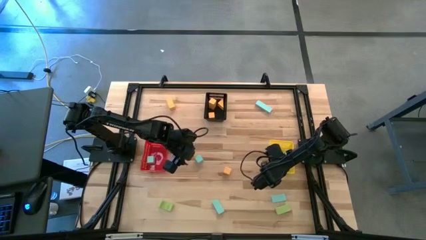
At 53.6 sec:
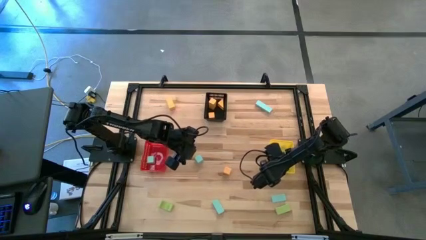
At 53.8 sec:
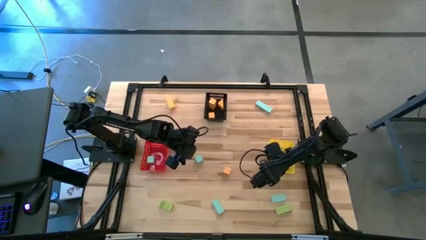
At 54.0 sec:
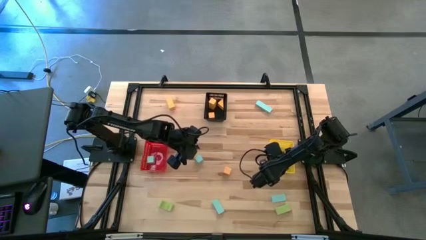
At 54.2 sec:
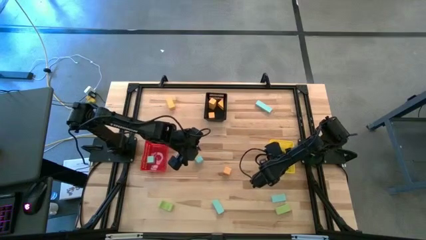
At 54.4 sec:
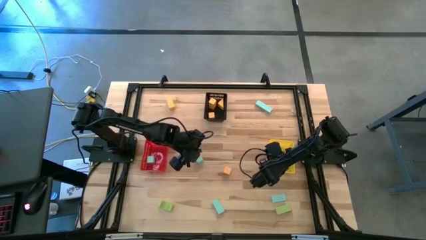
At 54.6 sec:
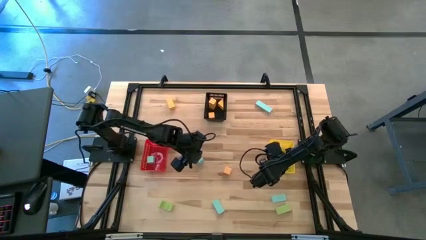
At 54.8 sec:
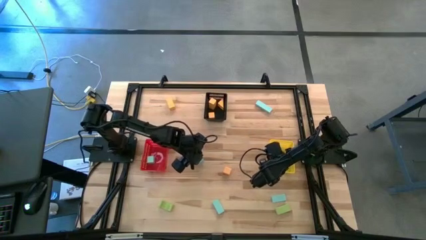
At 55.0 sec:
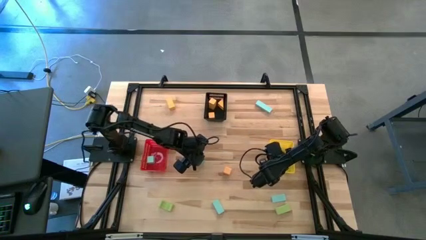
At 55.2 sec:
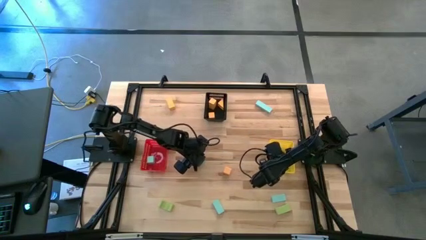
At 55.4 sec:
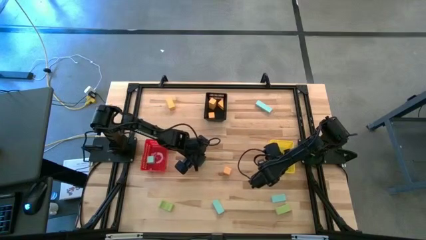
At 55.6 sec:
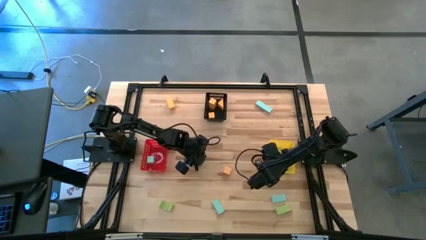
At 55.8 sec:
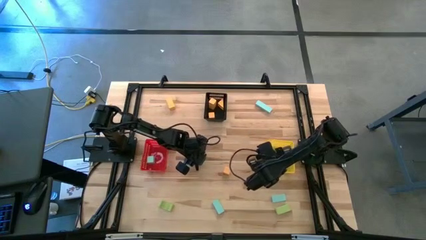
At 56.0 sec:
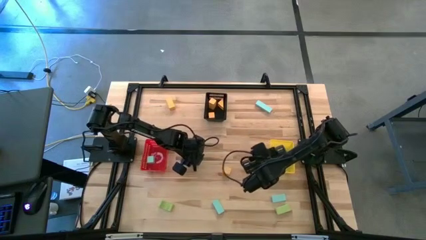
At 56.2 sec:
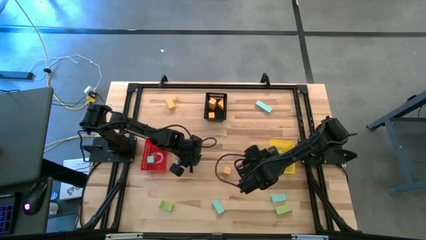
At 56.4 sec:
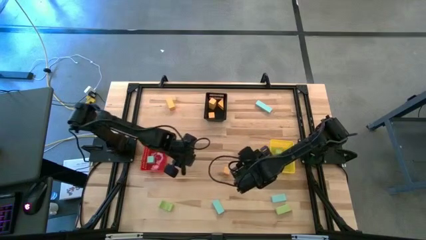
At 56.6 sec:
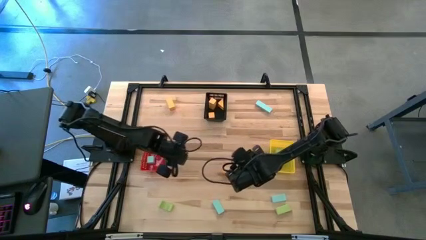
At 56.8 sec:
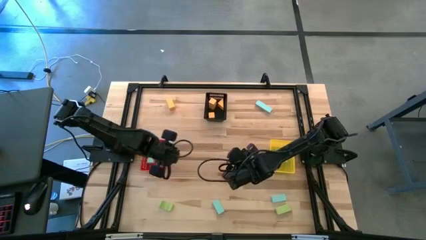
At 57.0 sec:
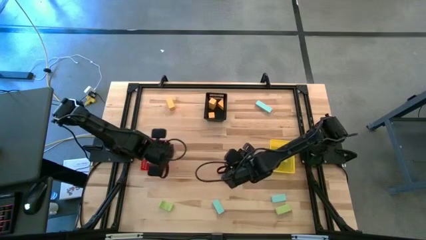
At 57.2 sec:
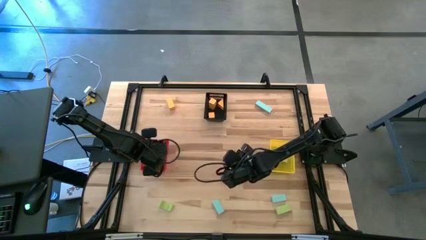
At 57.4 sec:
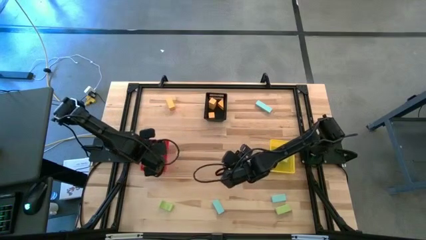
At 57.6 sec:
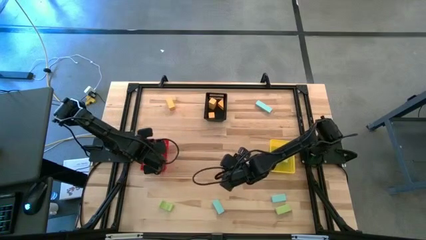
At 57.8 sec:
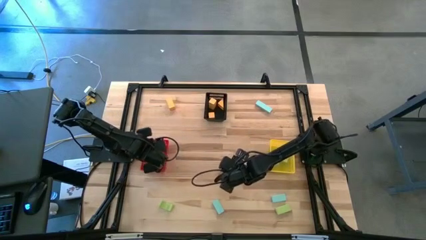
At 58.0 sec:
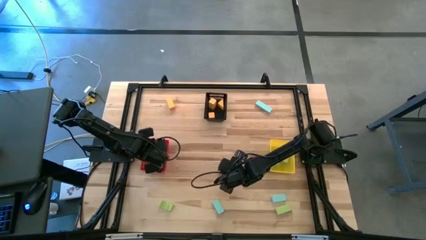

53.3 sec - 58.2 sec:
Task: Sort & place blocks by color
Put the blue block into the red bin

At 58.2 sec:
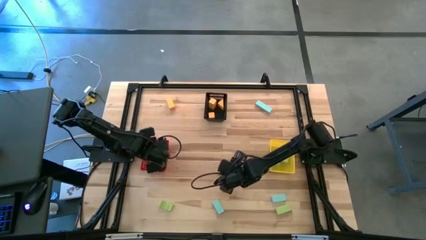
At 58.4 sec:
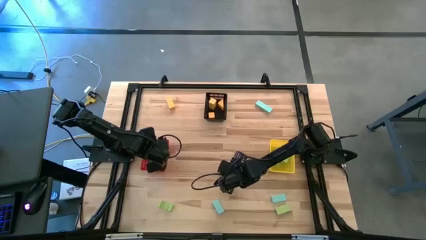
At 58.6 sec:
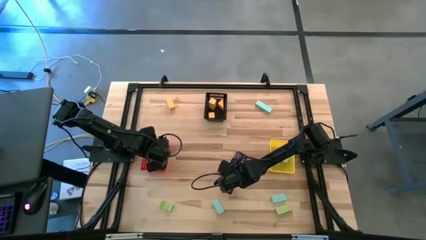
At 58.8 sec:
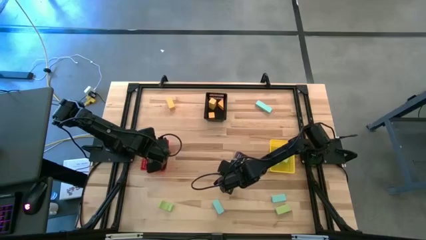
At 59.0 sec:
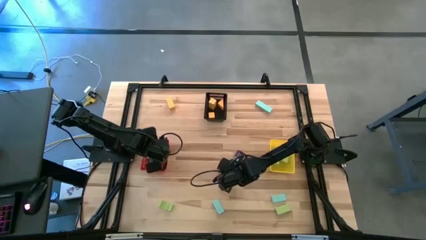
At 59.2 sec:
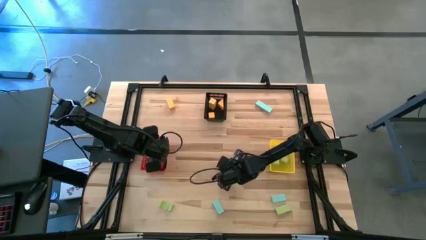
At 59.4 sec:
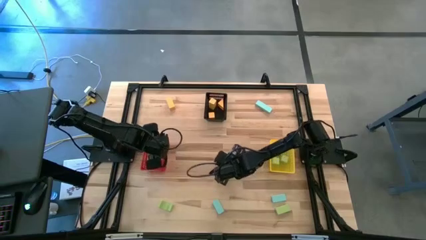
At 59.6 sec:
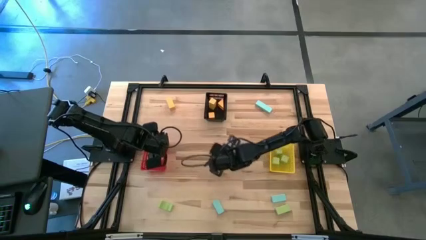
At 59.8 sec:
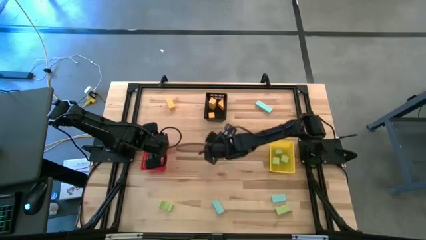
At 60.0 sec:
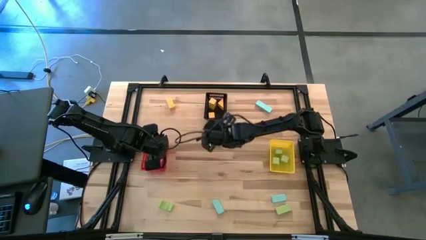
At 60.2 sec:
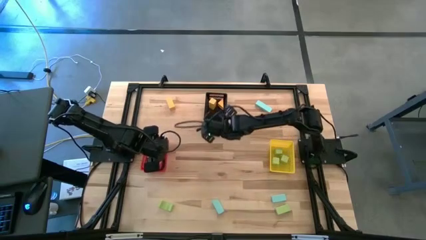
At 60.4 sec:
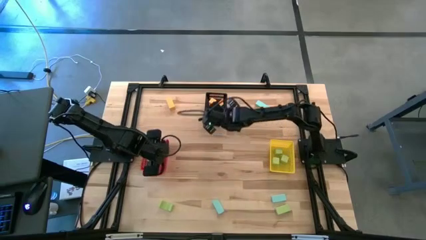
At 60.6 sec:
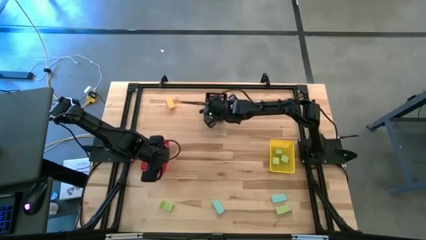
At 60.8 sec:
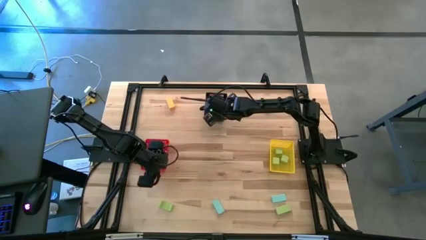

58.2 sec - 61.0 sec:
Put the yellow block into the black bin

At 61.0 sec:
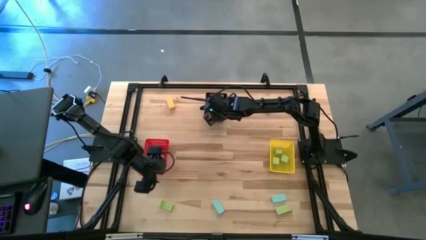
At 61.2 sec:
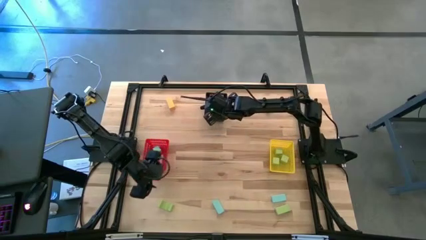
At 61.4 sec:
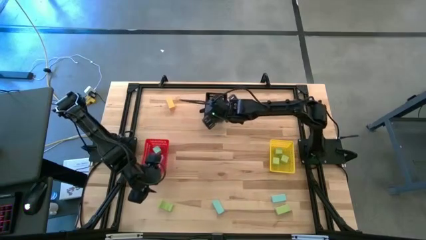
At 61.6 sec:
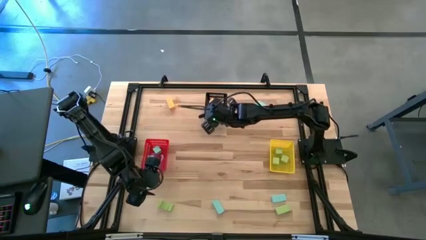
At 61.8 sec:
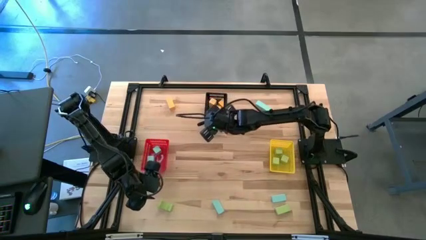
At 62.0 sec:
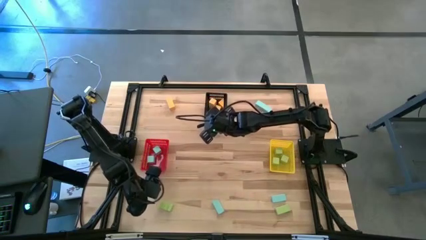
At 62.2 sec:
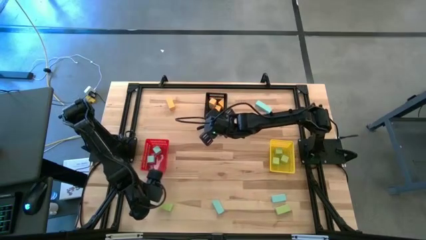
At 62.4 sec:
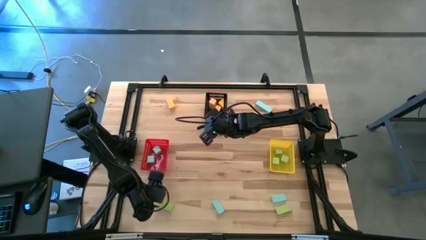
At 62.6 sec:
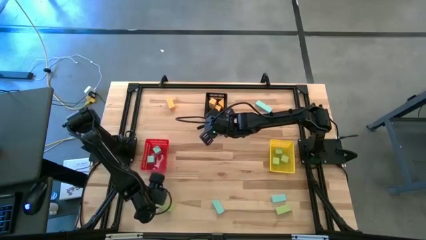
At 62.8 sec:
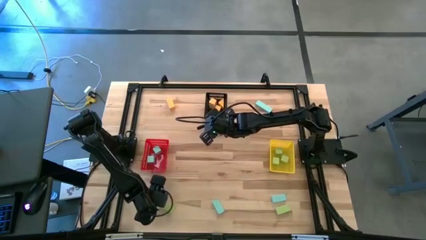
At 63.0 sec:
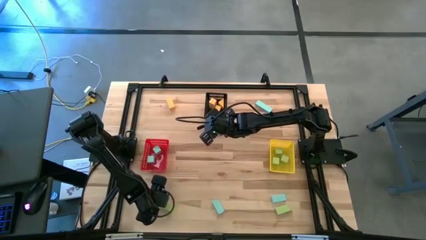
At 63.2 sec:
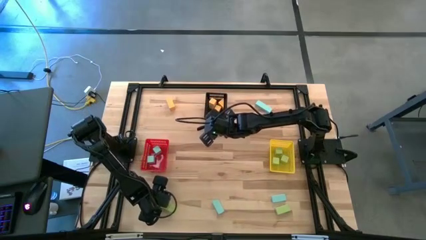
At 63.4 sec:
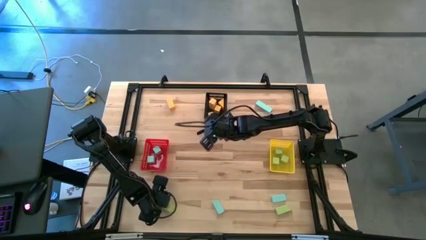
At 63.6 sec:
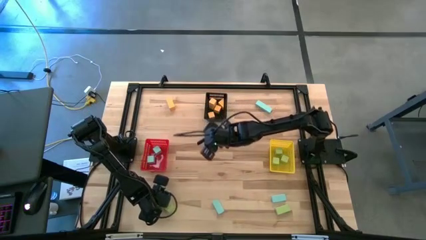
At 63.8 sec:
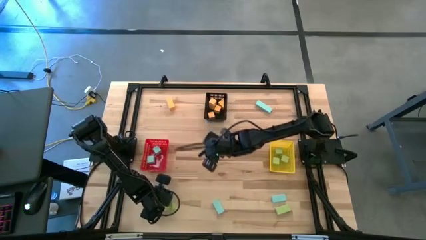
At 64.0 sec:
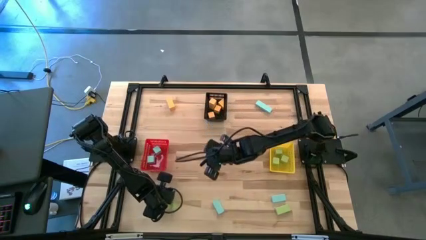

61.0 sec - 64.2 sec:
Put the green block into the yellow bin

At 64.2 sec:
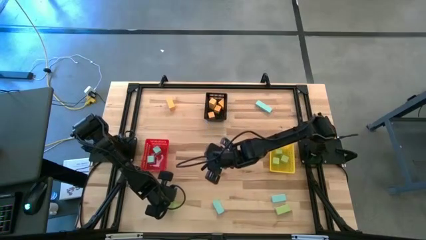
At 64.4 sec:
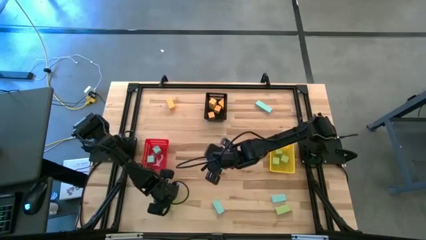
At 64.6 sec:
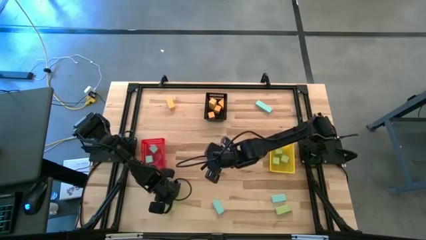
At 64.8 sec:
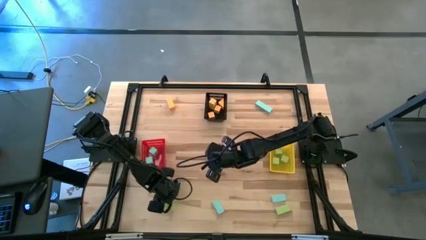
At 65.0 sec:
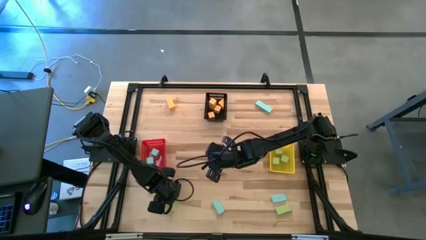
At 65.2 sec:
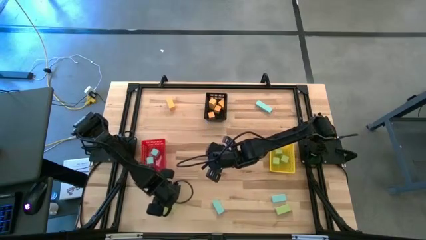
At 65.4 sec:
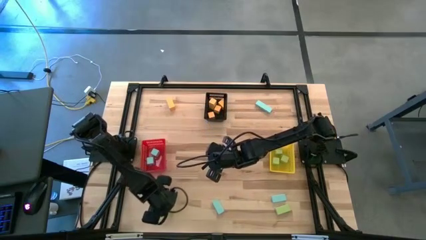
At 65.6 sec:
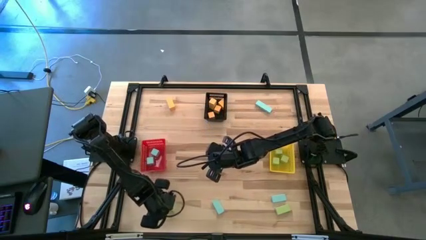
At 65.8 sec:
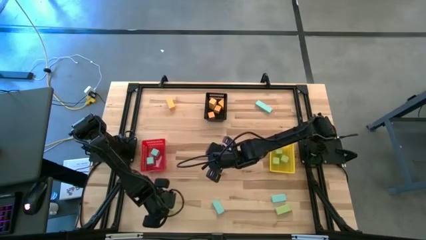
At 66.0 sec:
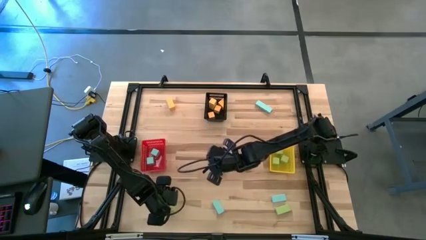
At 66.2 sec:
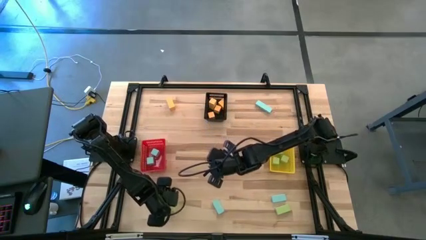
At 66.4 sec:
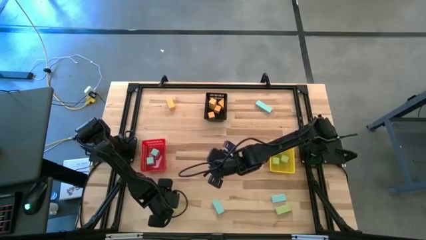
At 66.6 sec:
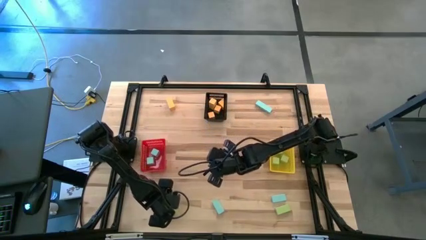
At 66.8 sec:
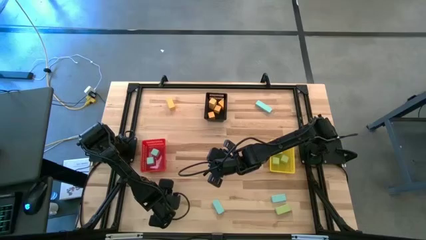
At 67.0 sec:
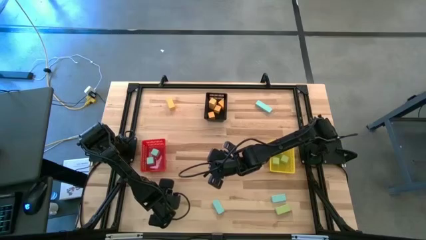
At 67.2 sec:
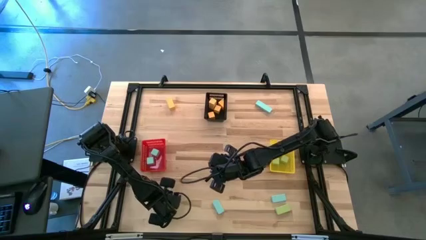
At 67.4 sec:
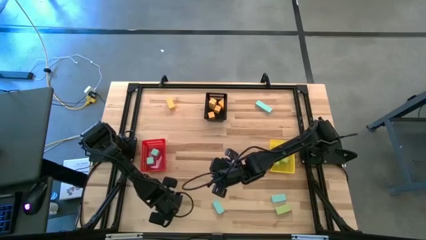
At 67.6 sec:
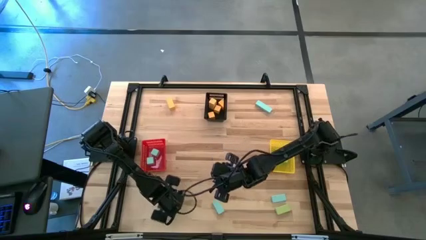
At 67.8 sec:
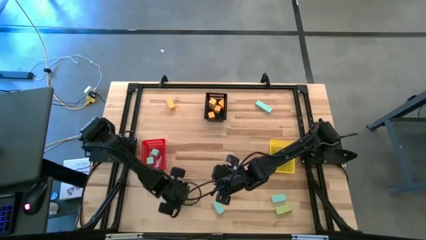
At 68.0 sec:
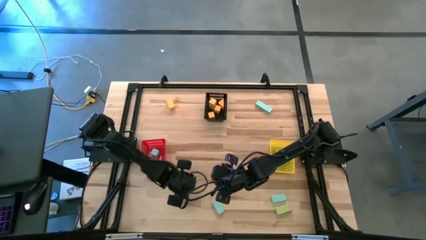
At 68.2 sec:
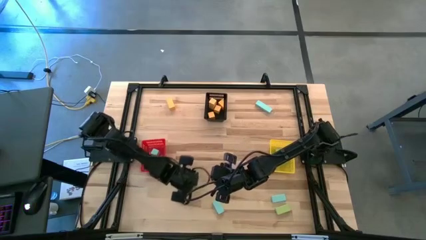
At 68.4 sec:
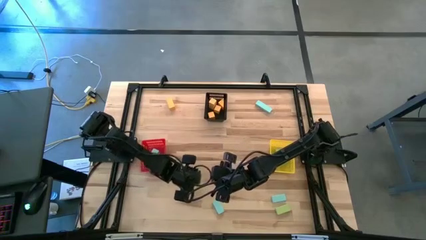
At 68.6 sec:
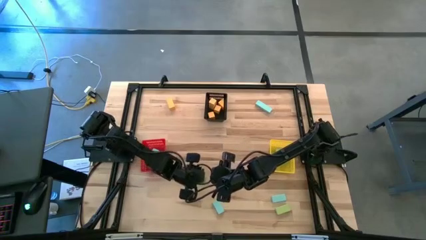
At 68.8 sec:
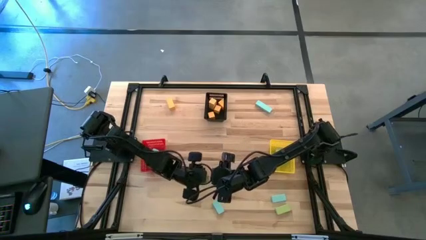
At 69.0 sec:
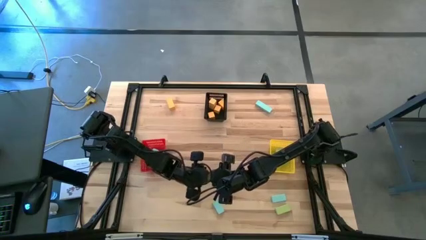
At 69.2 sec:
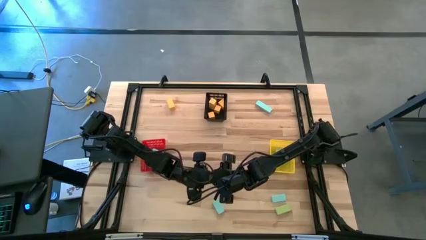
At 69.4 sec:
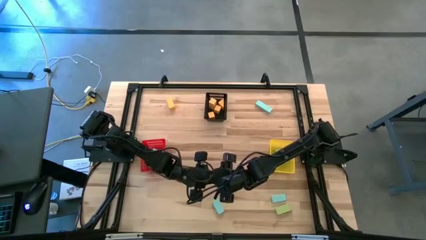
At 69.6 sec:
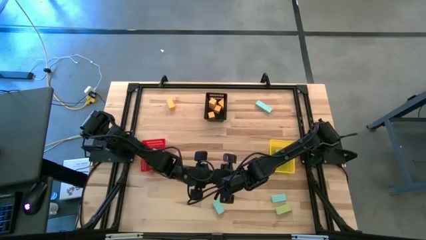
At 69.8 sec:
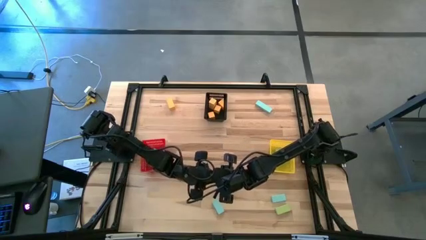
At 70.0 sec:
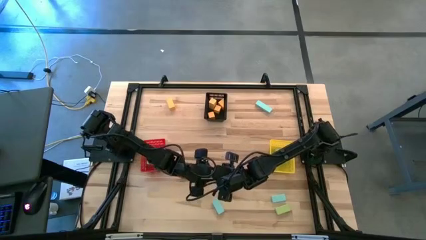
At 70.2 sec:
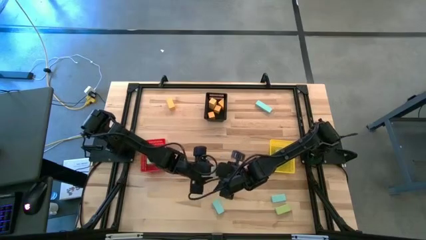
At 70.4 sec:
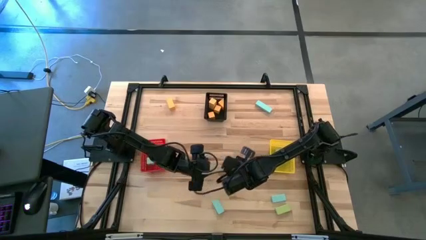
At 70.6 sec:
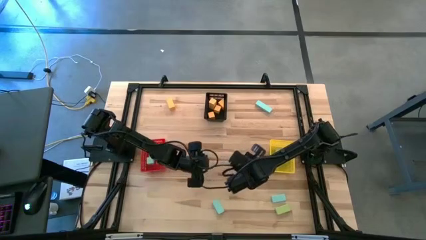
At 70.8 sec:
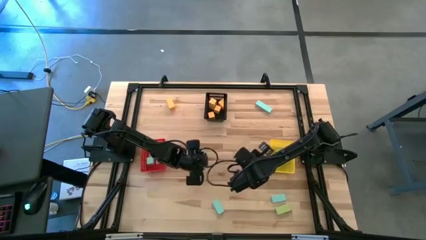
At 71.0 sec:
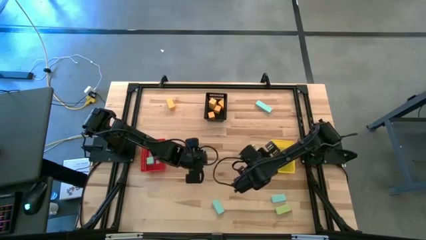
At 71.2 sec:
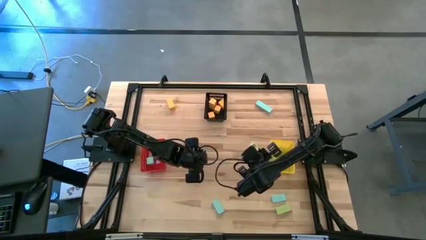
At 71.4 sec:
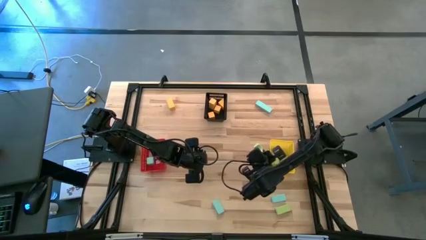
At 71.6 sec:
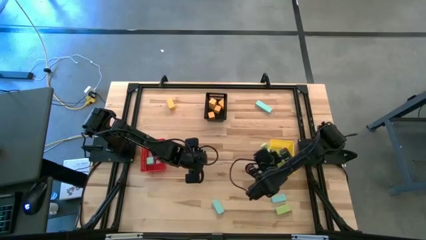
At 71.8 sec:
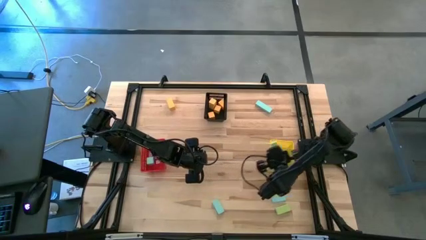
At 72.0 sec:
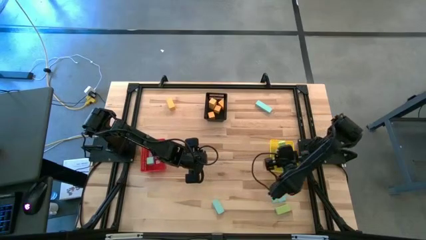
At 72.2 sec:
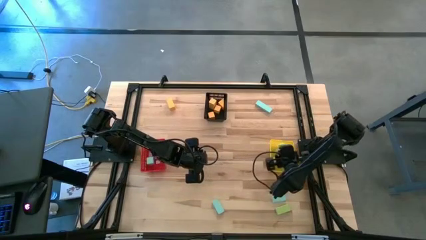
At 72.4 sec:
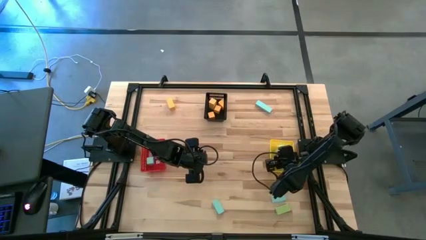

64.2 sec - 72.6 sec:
Put the green block into the yellow bin
